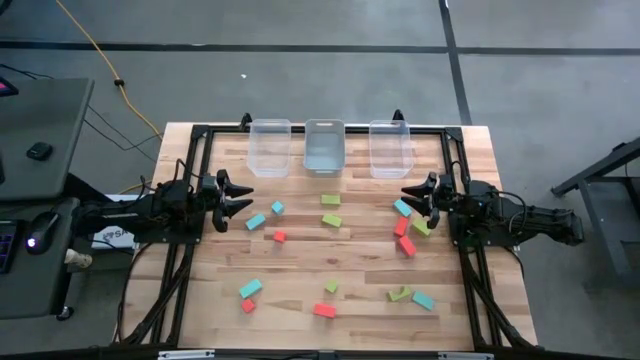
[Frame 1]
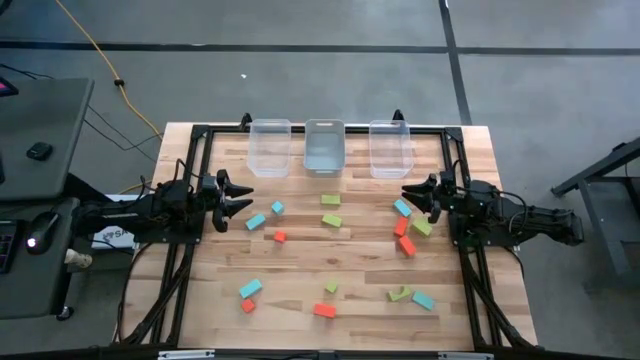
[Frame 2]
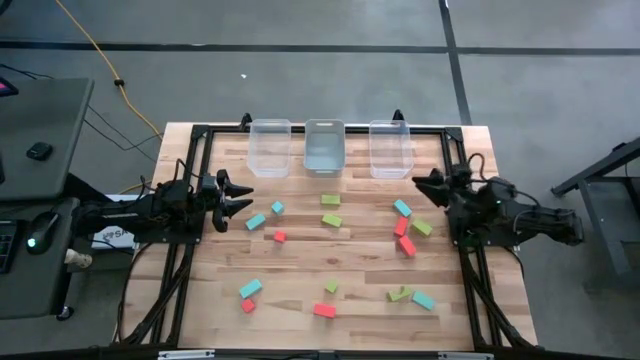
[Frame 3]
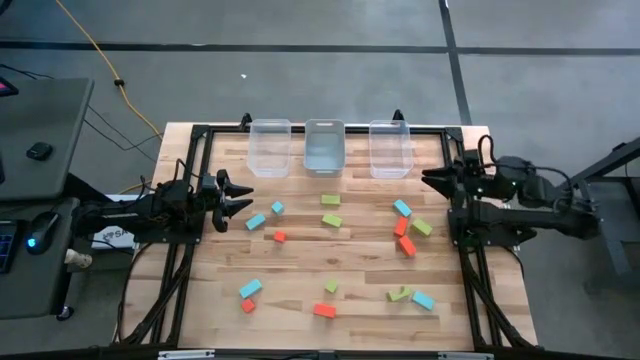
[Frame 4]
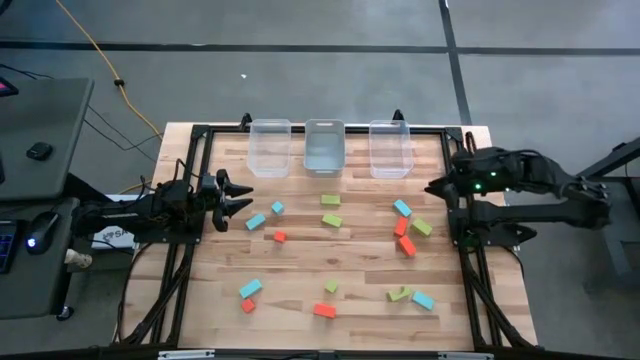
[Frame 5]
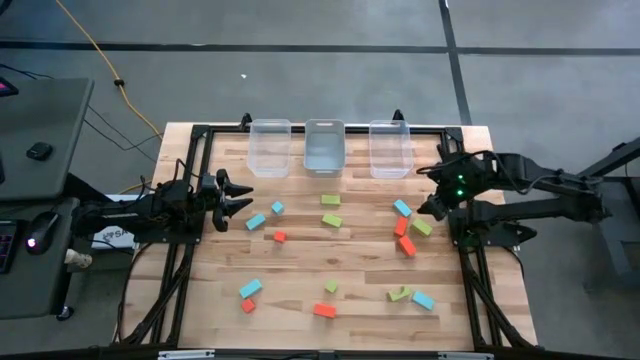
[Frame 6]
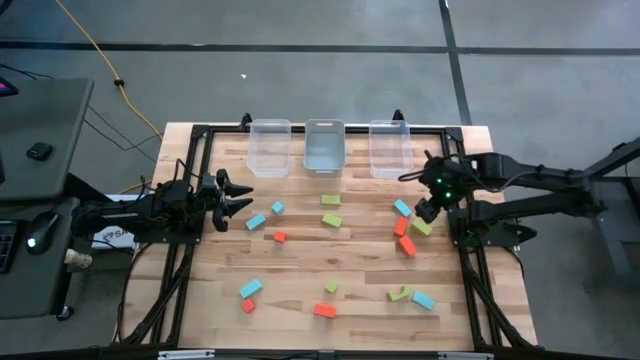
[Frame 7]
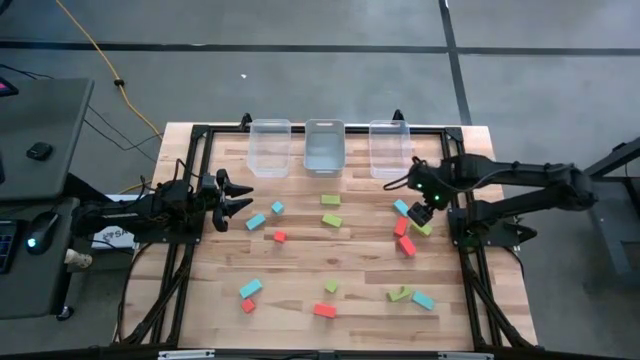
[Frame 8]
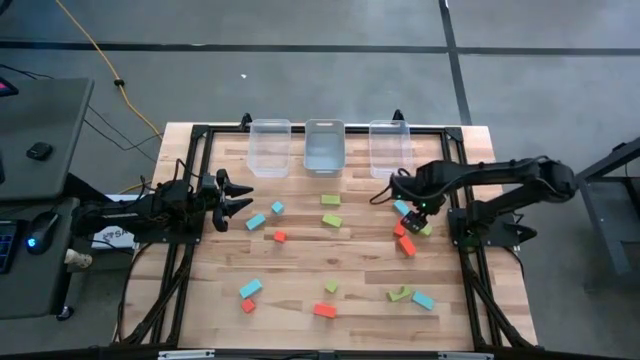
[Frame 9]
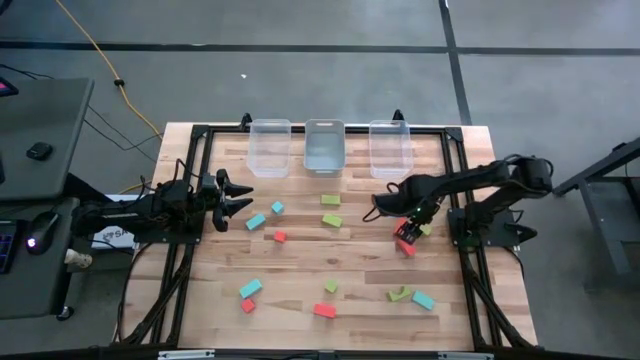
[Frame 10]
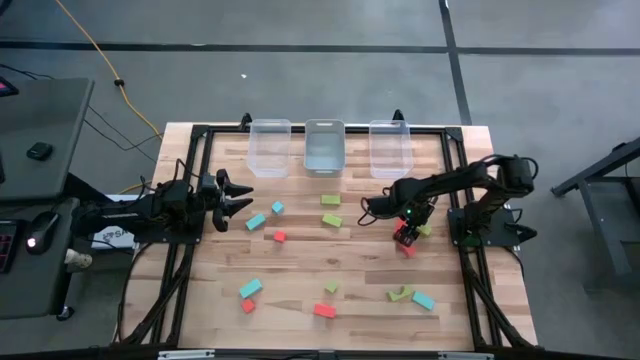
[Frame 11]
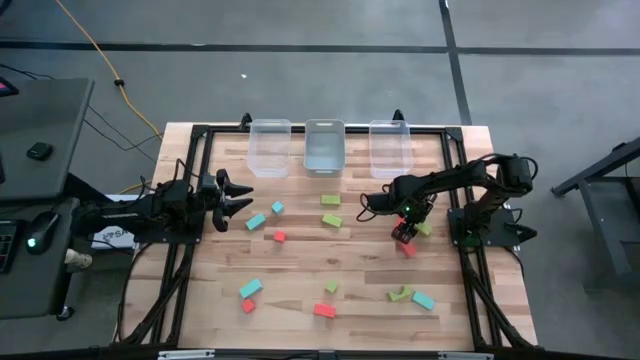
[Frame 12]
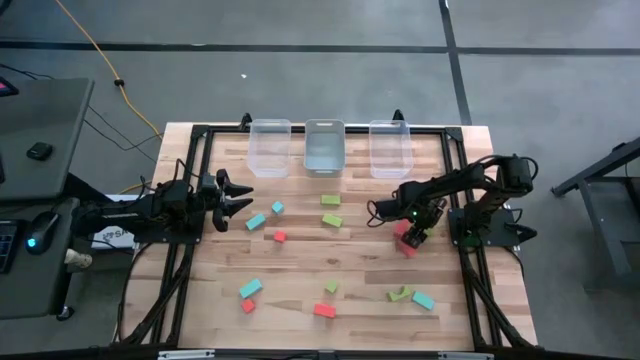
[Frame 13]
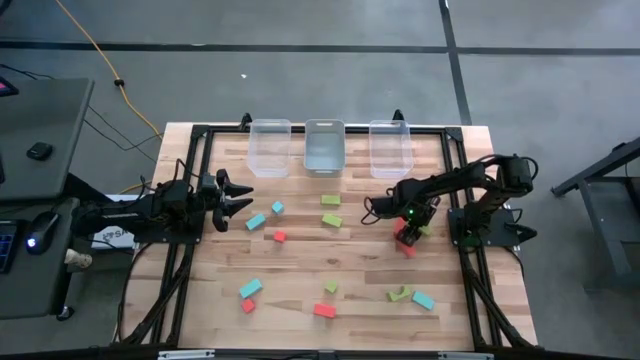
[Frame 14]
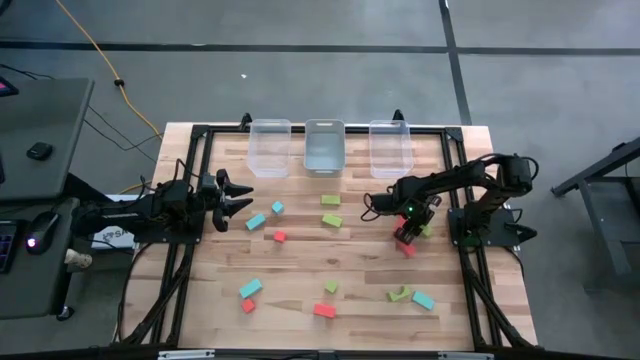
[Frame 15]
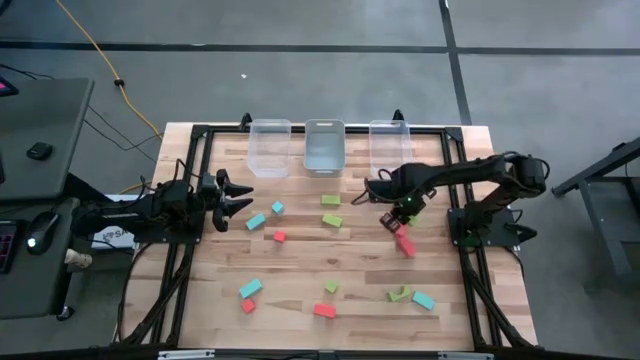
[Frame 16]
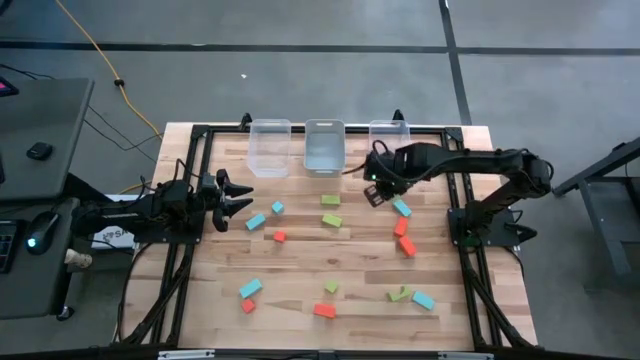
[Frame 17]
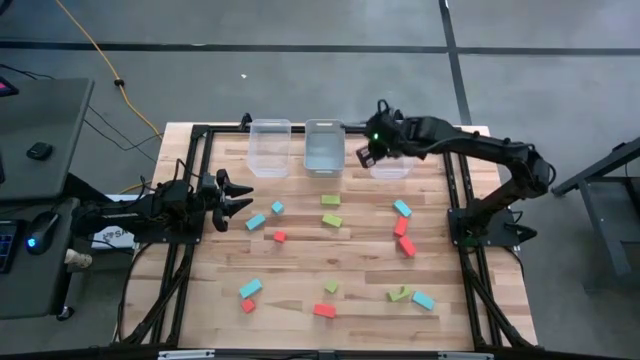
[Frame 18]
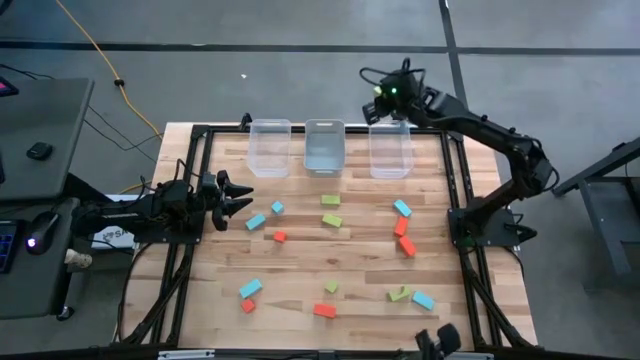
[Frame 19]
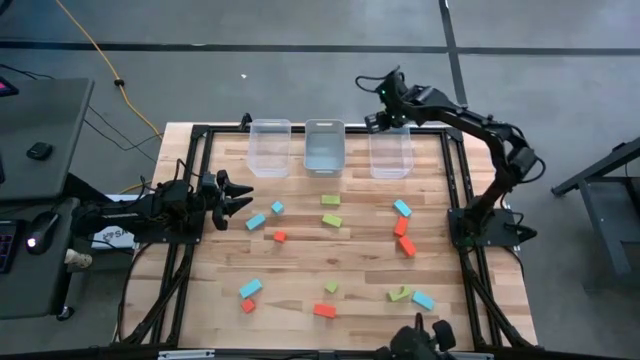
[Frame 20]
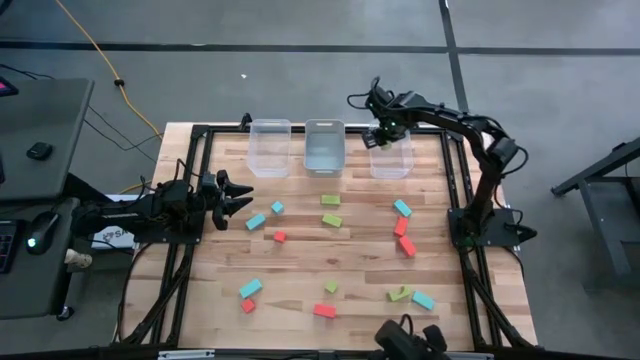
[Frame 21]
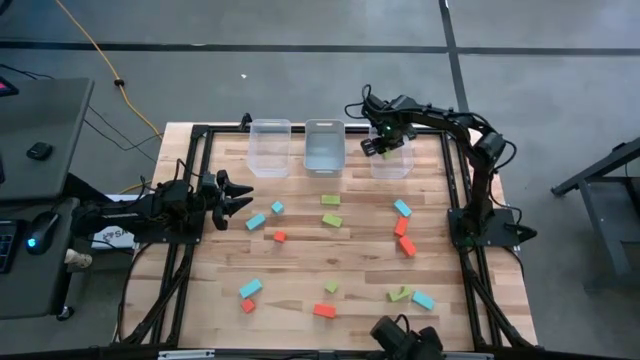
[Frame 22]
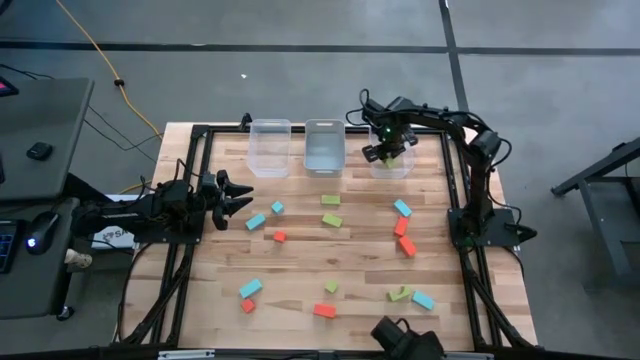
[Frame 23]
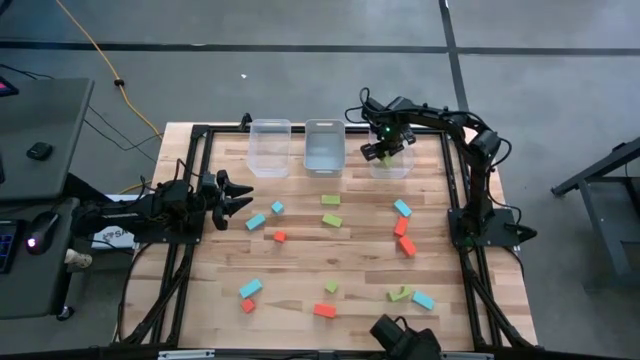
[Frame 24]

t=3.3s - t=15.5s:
Task: Sort & place blocks by color
Put the large green rectangular block into the right transparent bin

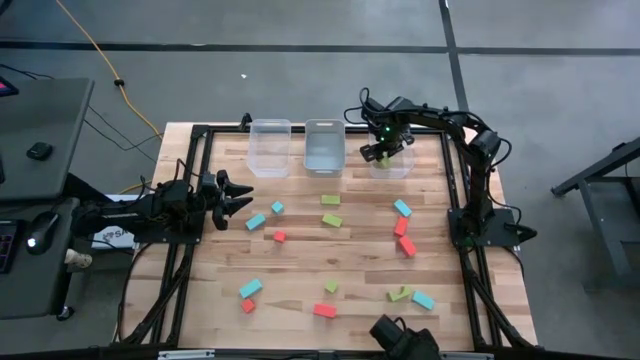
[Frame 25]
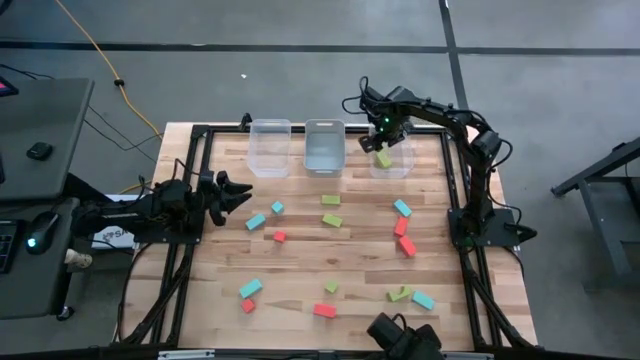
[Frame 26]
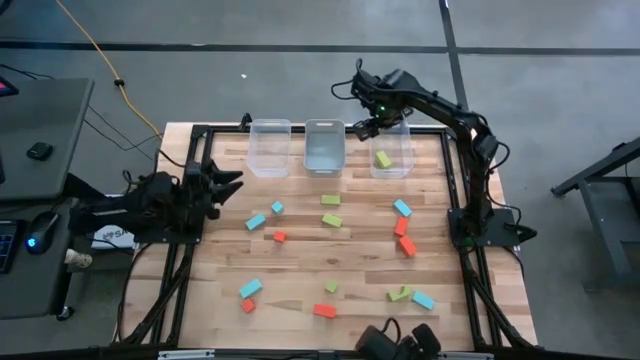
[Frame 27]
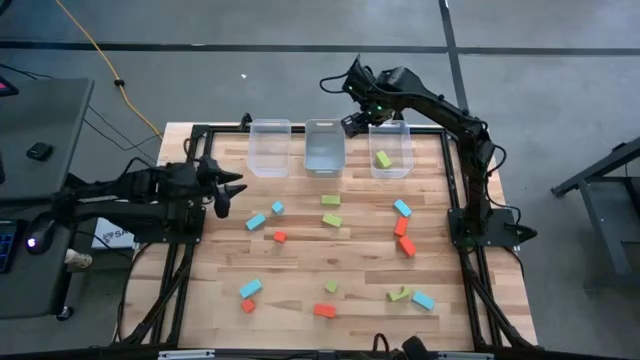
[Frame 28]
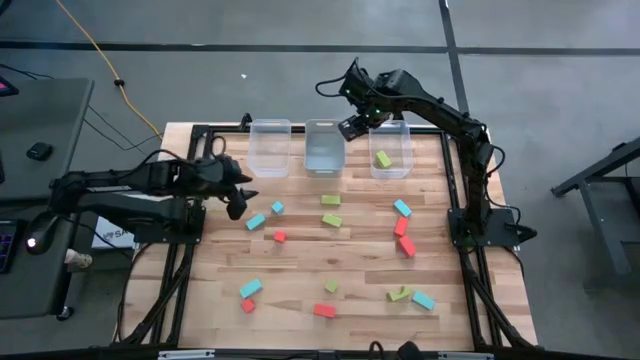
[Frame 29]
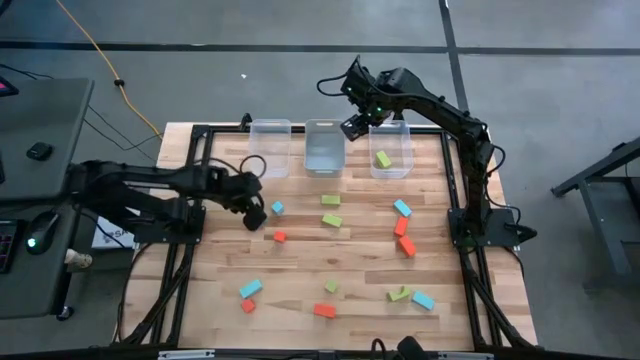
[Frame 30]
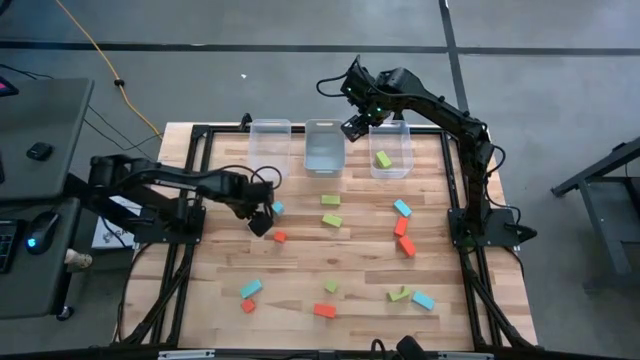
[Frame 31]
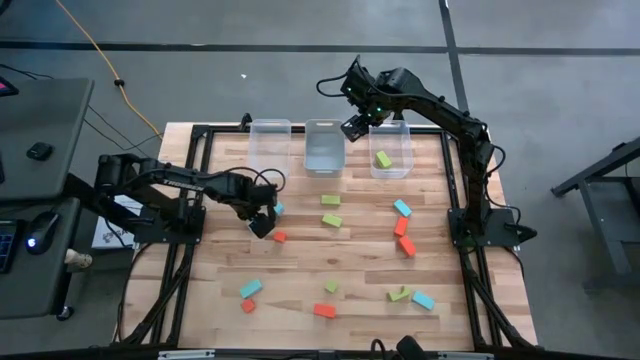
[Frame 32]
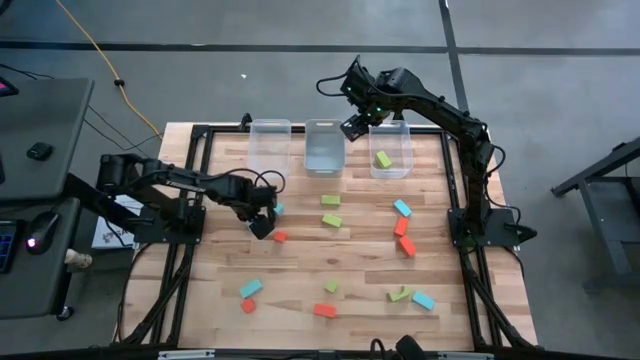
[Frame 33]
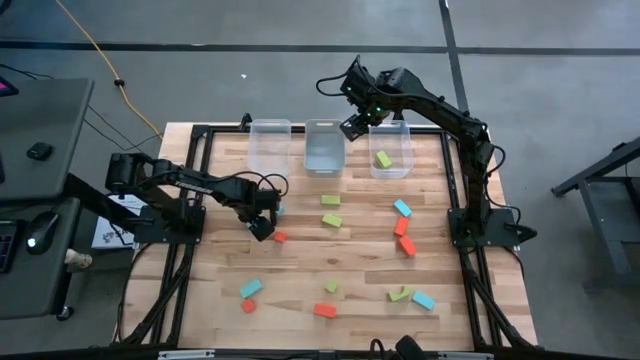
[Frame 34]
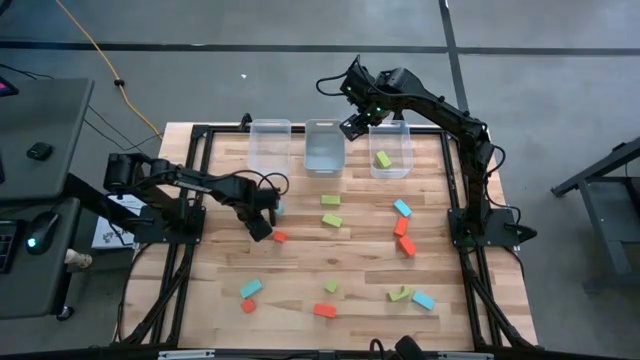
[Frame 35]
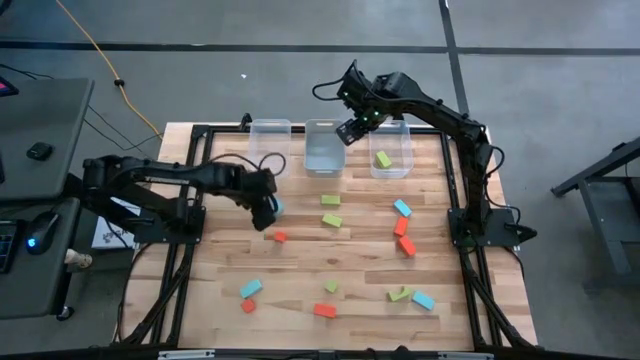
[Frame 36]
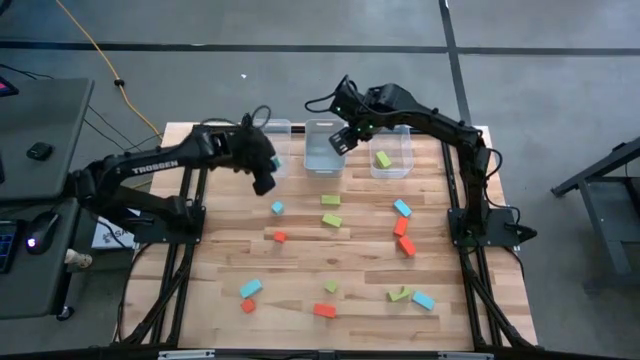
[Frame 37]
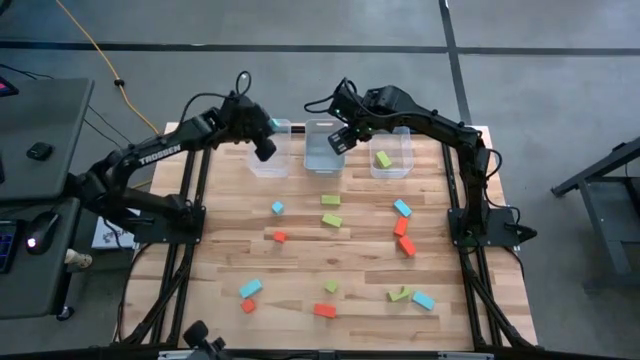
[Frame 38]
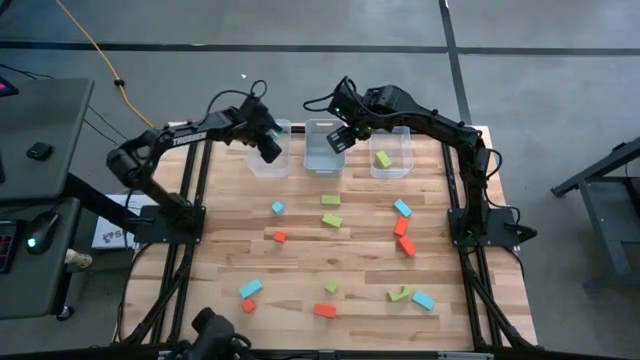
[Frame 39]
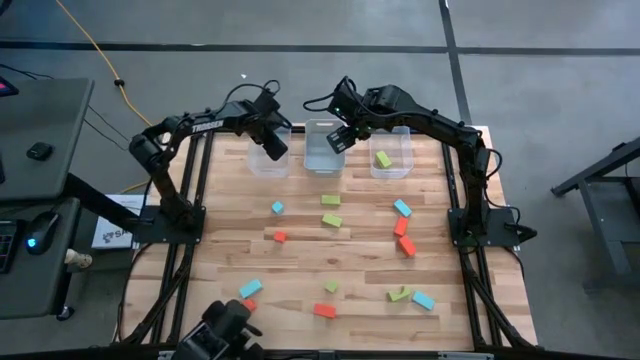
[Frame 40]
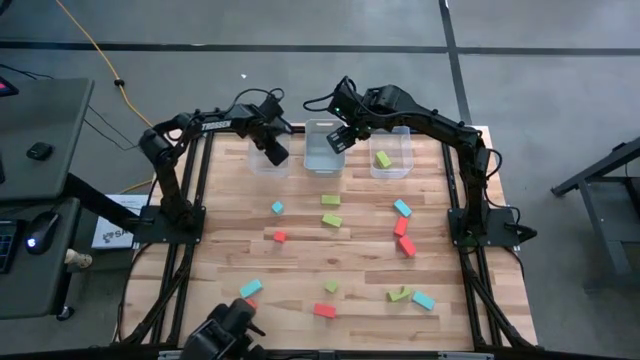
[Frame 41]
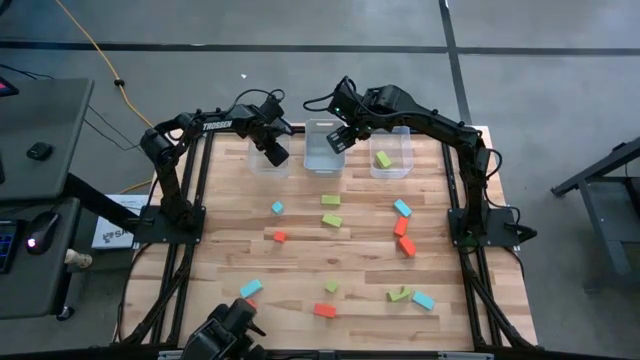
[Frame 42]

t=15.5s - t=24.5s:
Put the small blue rectangular block into the left transparent bin
